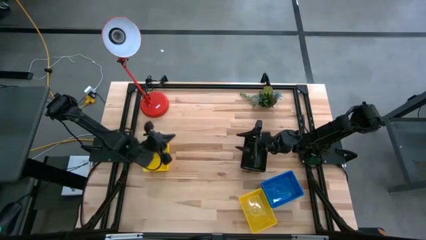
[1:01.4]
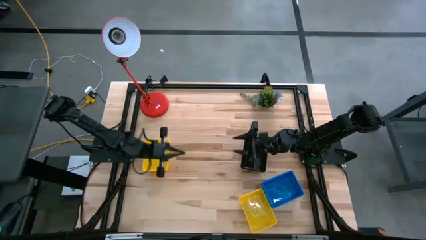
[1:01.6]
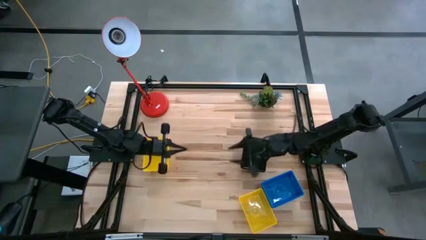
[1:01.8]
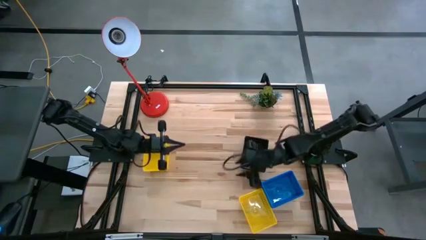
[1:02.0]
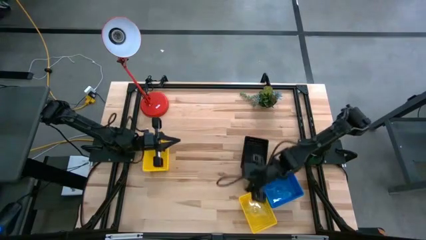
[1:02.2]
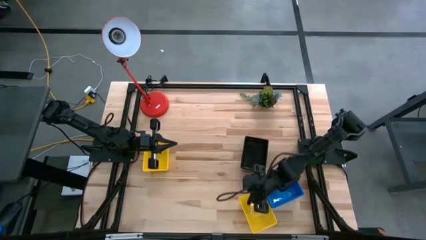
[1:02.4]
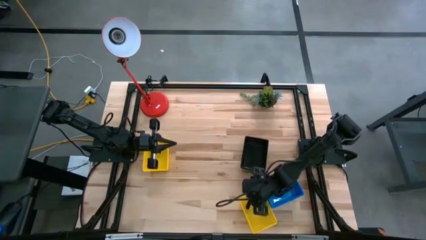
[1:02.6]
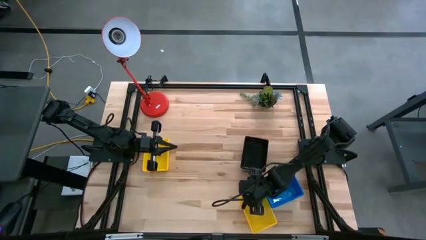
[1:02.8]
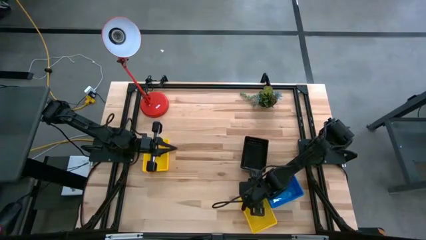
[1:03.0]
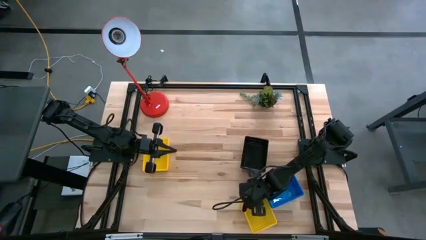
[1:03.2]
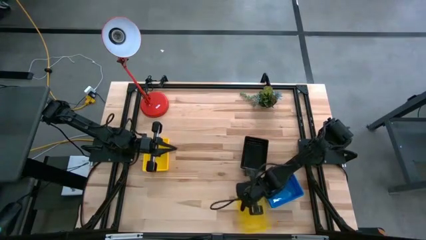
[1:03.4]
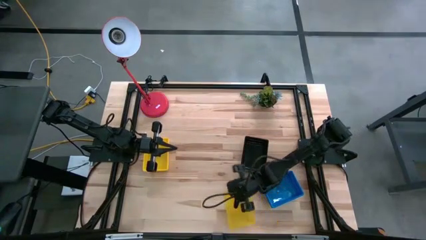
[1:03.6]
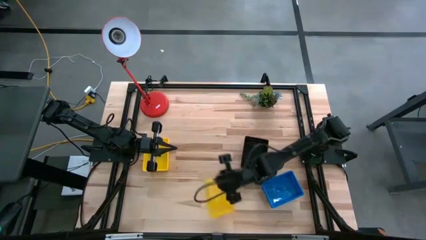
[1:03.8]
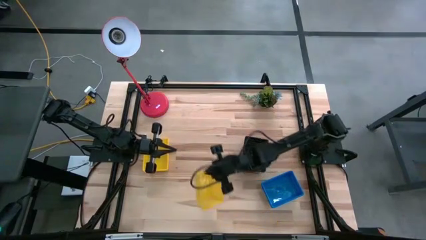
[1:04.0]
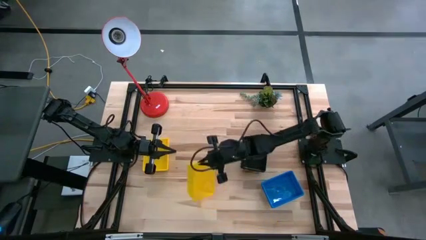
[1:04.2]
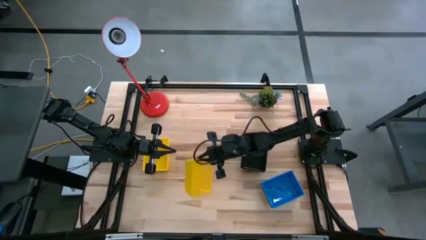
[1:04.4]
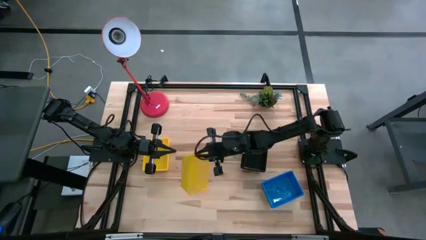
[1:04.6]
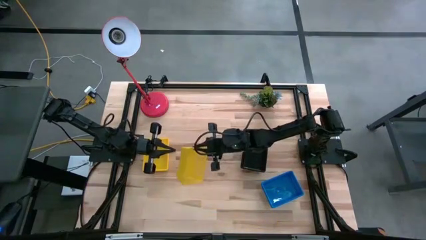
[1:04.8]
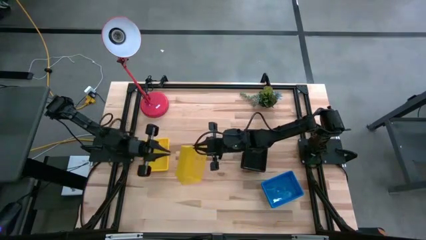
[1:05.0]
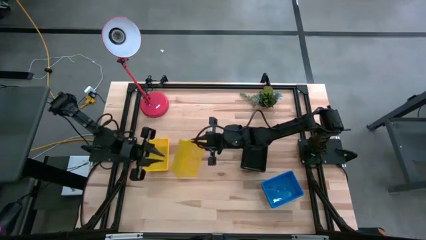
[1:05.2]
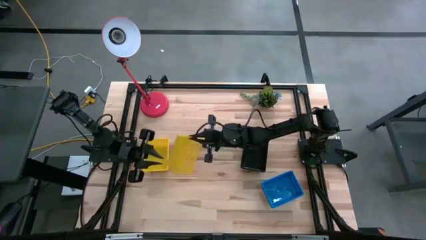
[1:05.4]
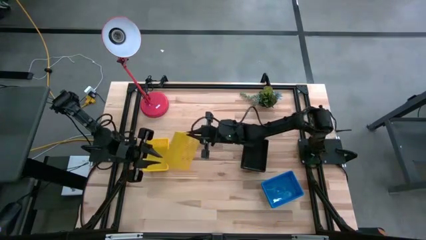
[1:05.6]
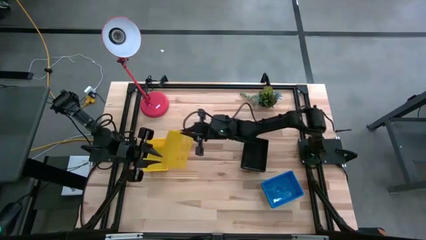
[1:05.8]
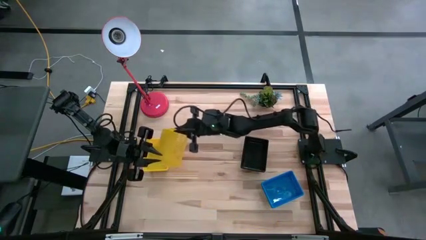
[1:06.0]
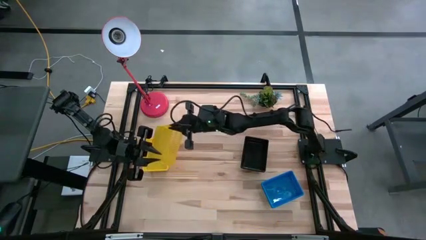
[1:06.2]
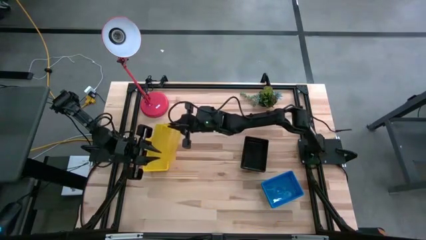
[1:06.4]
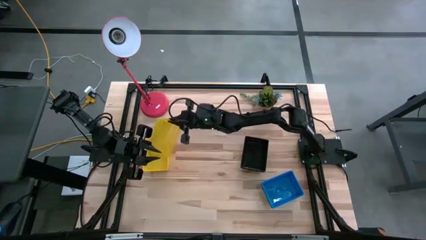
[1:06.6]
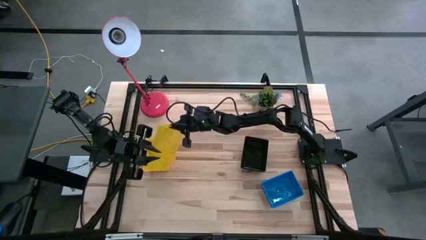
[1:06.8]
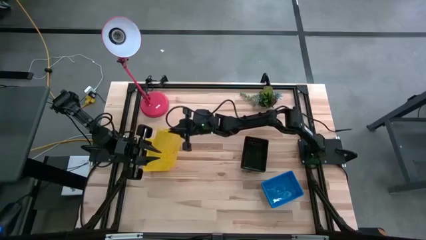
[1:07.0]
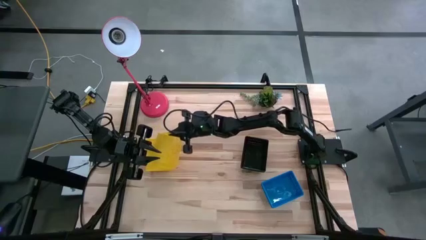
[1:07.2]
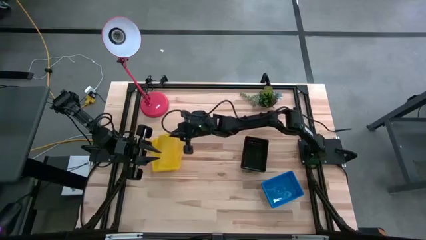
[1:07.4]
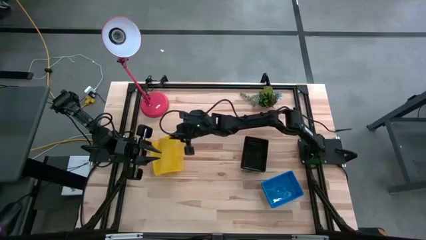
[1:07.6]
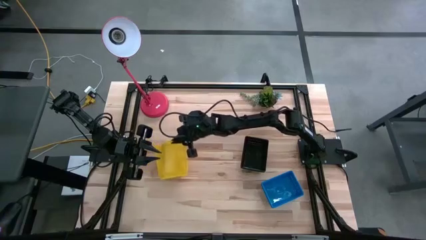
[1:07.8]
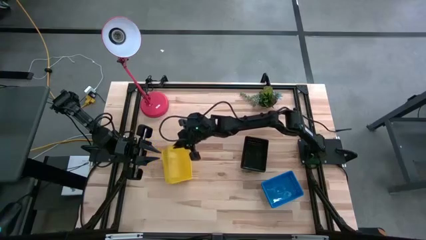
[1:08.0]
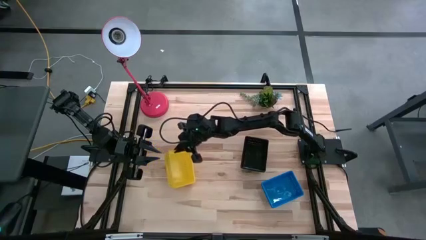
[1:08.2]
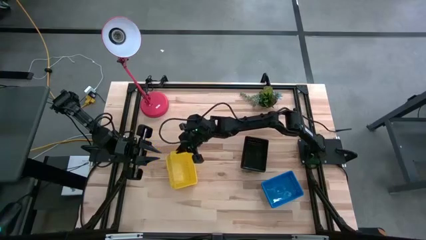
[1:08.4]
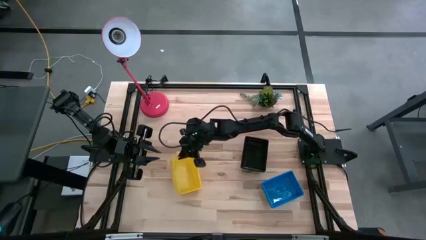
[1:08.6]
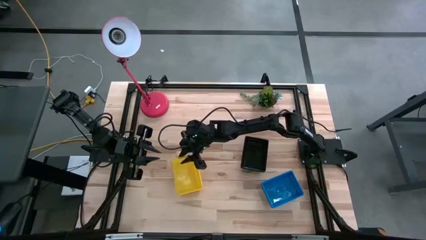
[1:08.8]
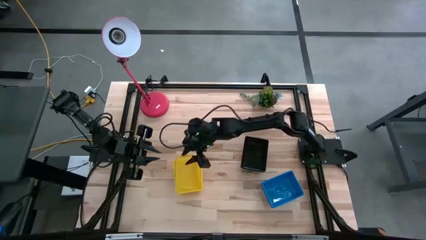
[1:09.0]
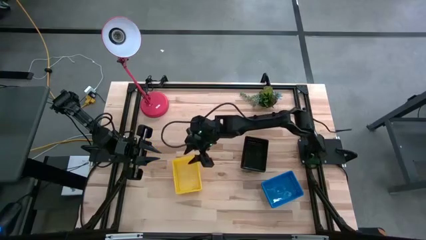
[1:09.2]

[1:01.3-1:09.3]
Stack the bottom yellow basket on the top yellow basket
